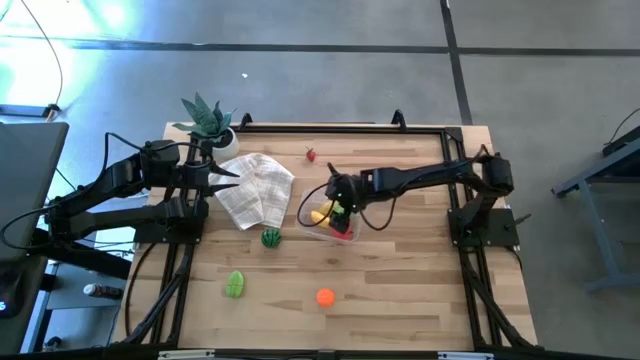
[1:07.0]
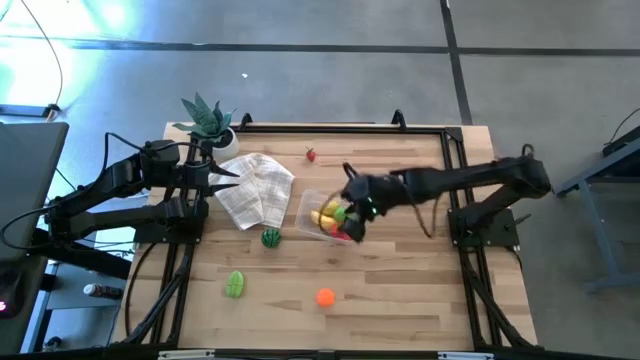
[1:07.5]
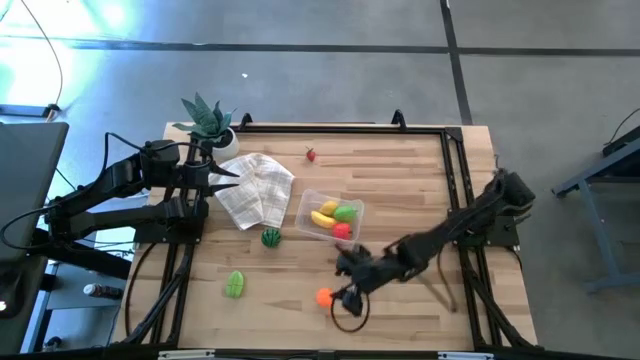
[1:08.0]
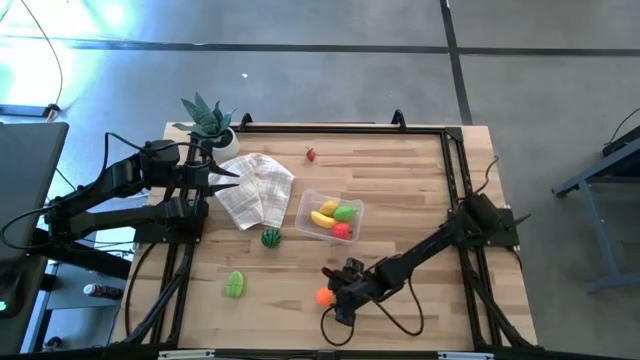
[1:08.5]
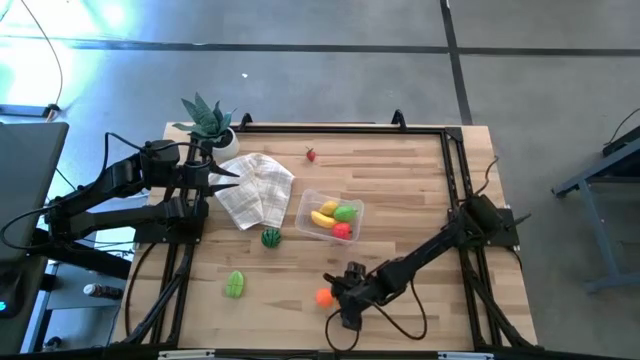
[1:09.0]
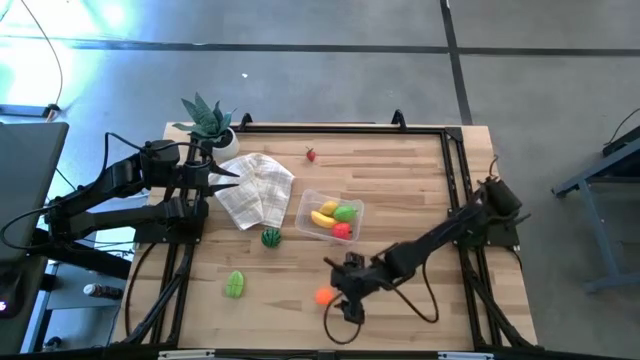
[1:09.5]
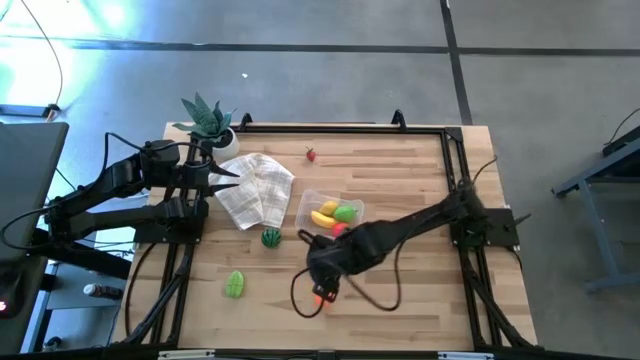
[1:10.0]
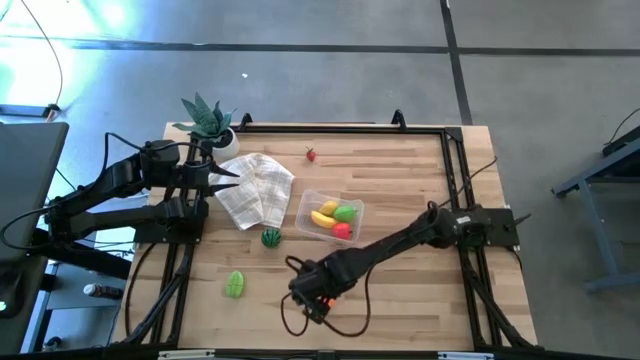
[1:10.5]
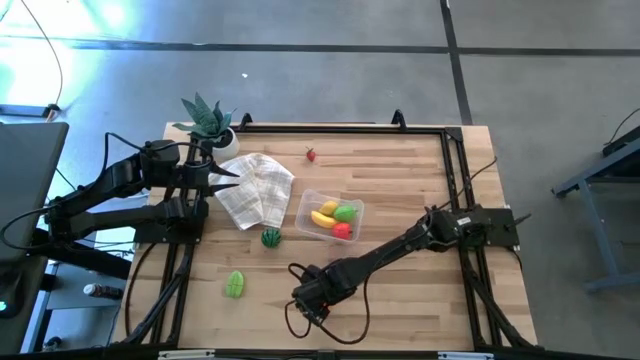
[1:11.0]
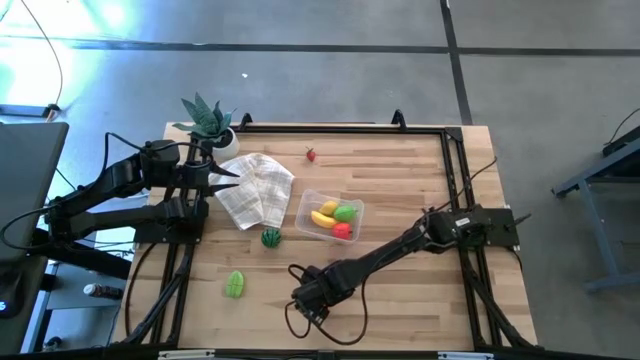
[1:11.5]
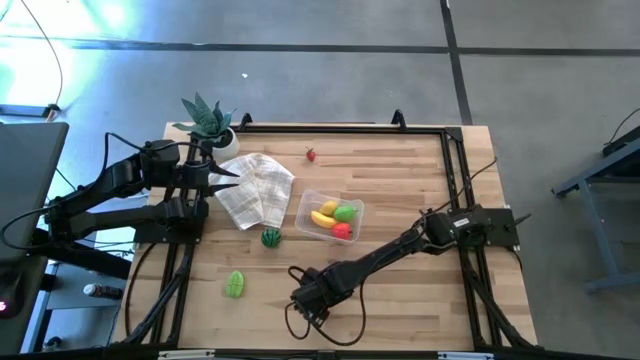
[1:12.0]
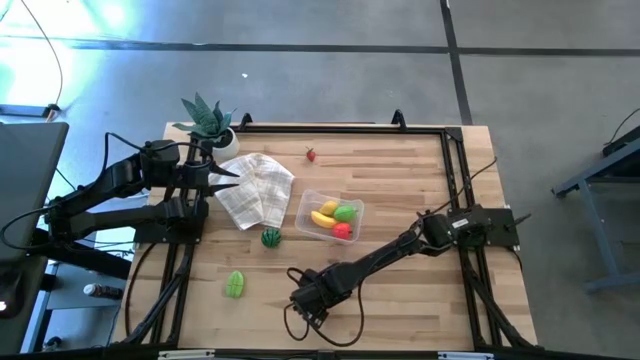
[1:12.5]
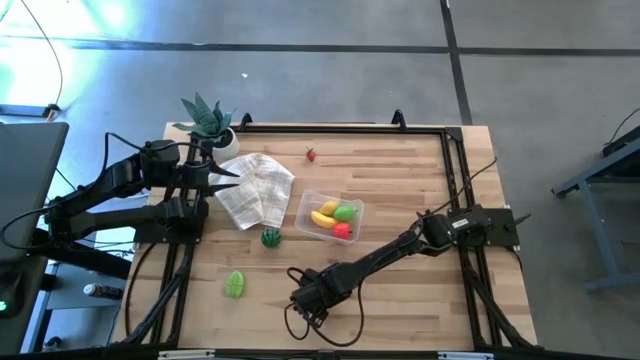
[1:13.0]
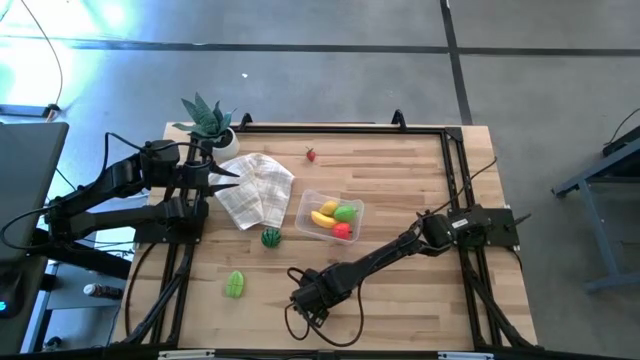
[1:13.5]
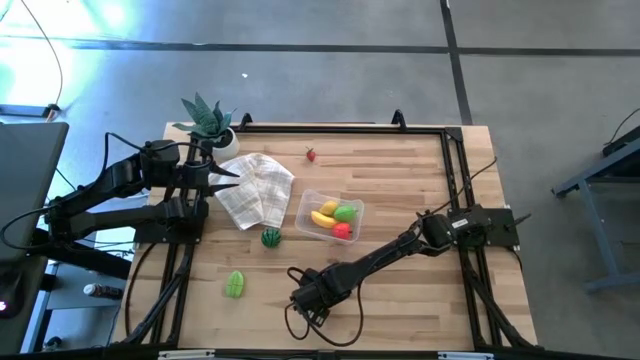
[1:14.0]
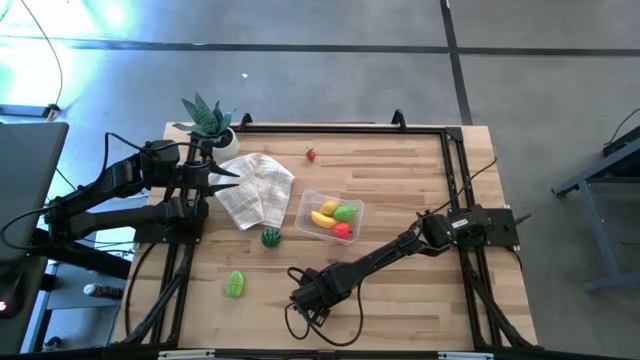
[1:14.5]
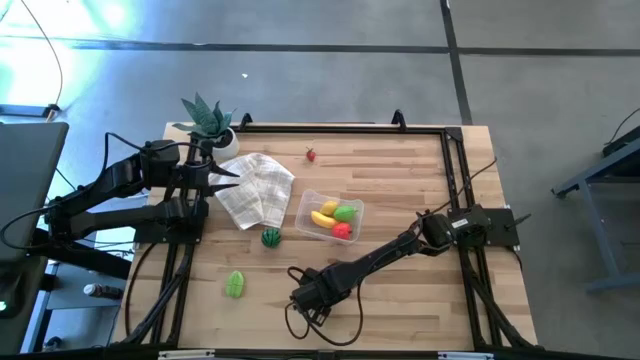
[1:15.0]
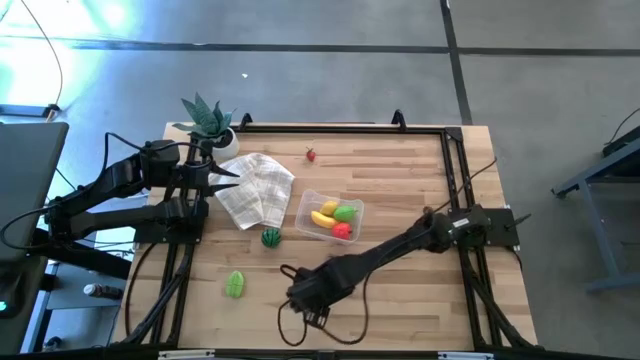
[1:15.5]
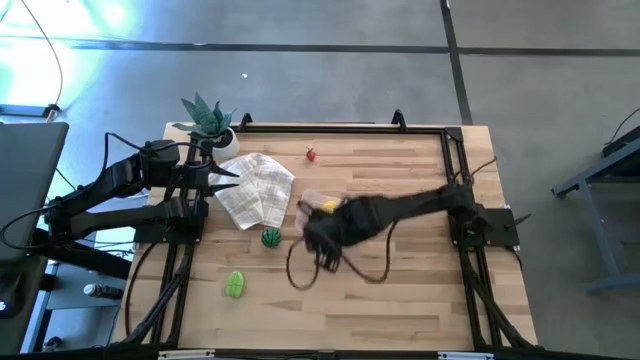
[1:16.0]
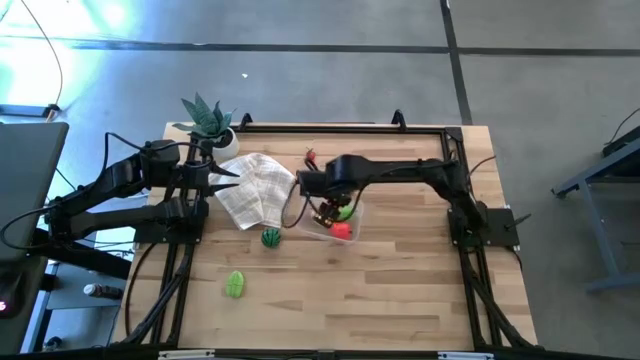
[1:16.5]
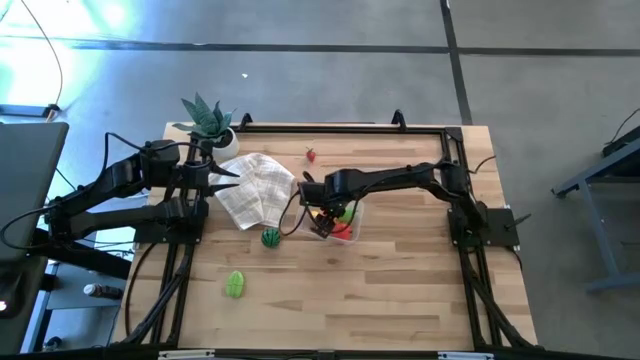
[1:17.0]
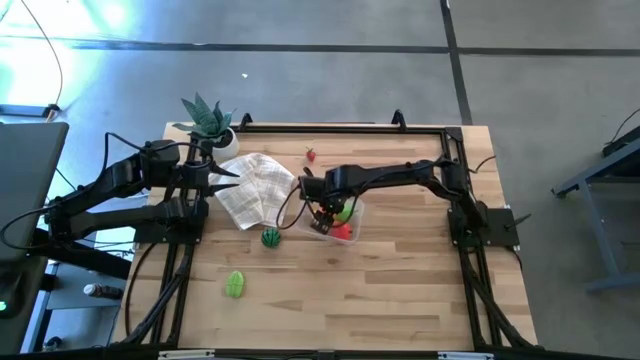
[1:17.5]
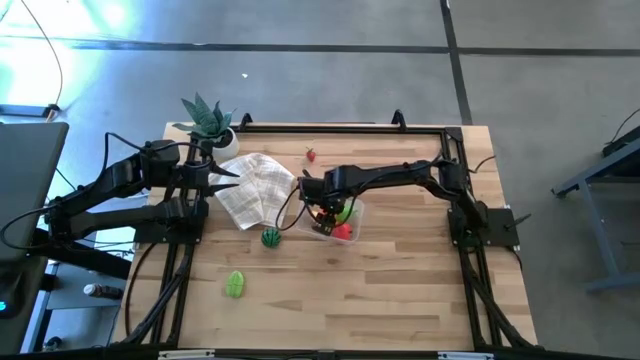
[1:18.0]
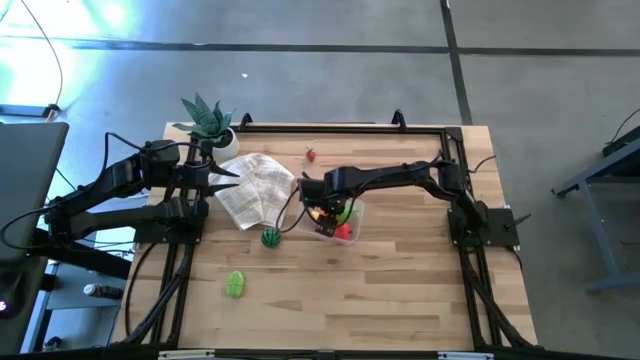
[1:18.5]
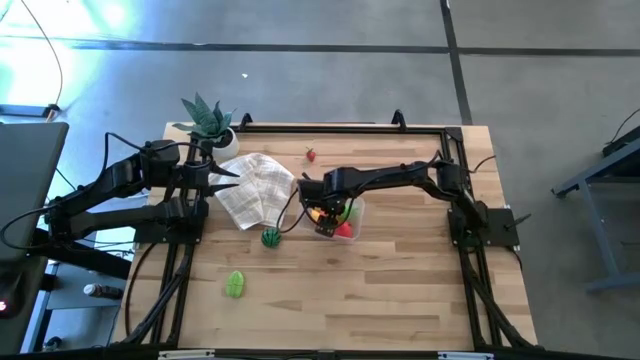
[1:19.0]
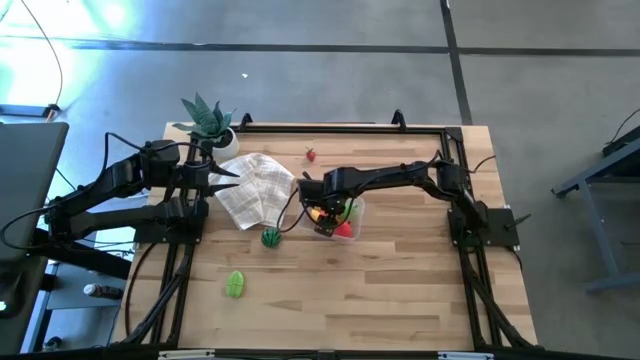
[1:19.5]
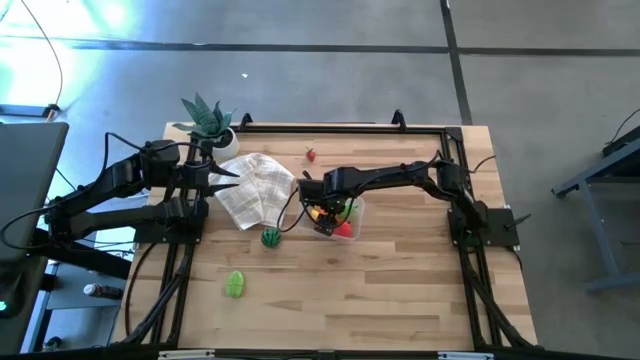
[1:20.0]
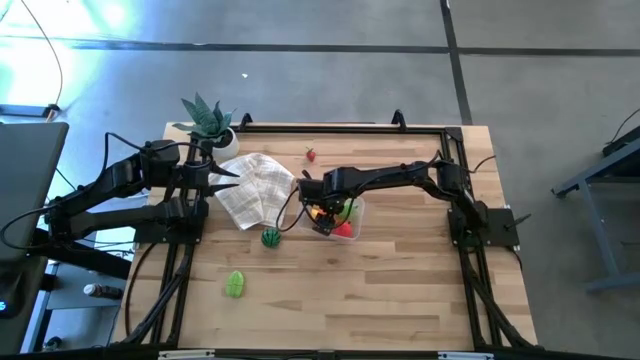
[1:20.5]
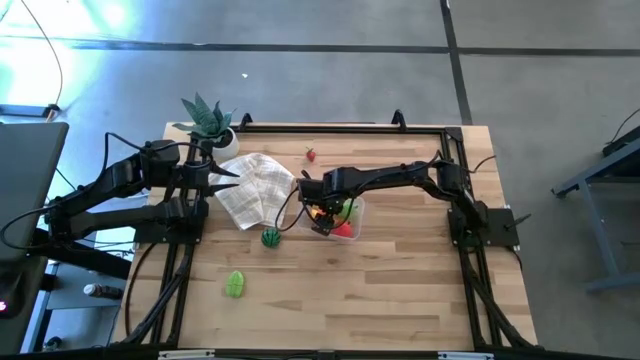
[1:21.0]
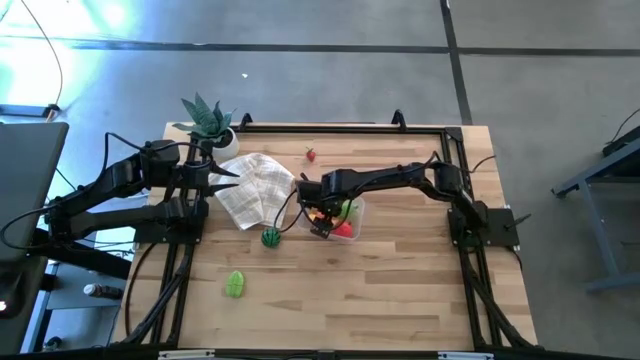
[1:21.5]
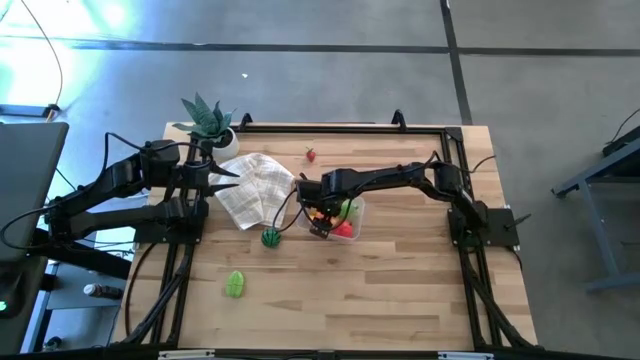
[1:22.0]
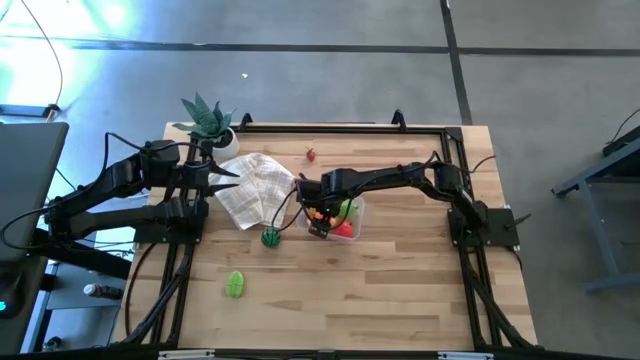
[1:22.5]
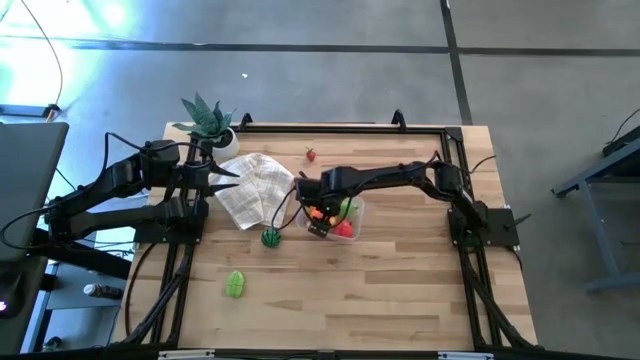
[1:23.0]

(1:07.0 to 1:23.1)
Task: Pick and placing Produce into tupperware
Put the orange pumpkin into the transparent container

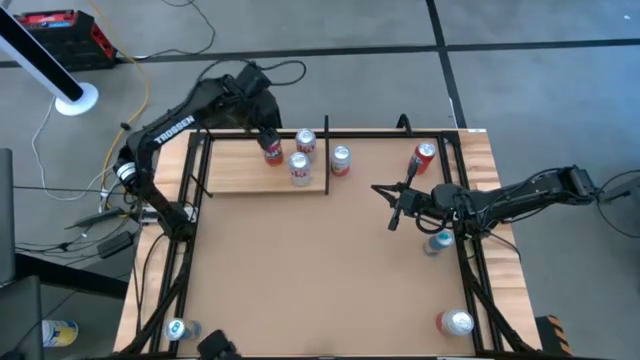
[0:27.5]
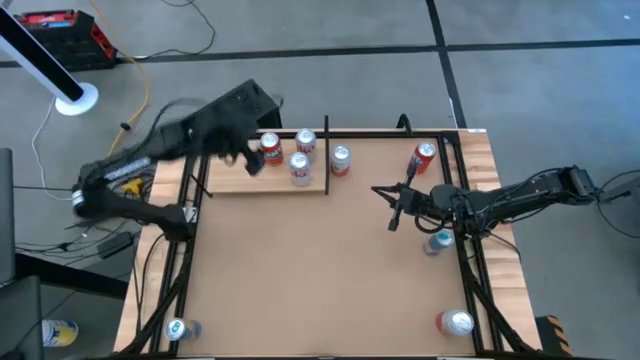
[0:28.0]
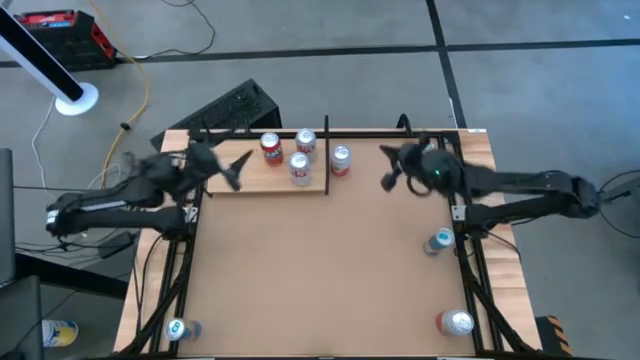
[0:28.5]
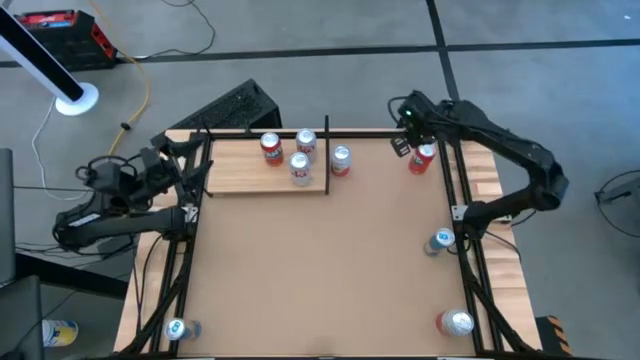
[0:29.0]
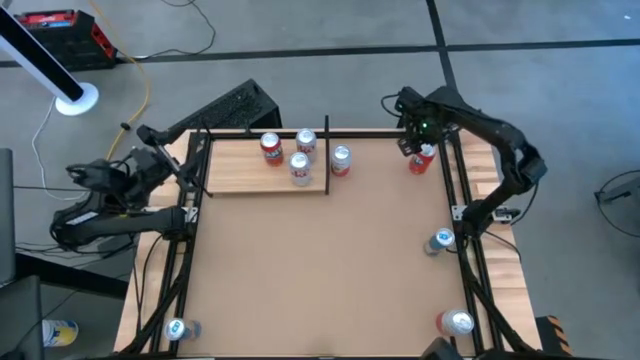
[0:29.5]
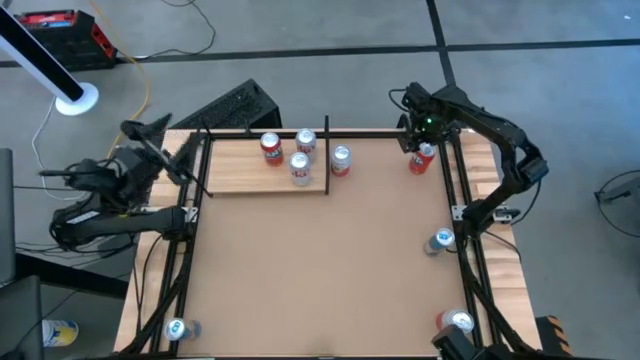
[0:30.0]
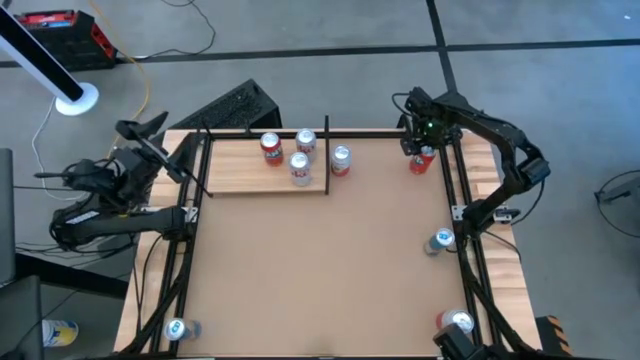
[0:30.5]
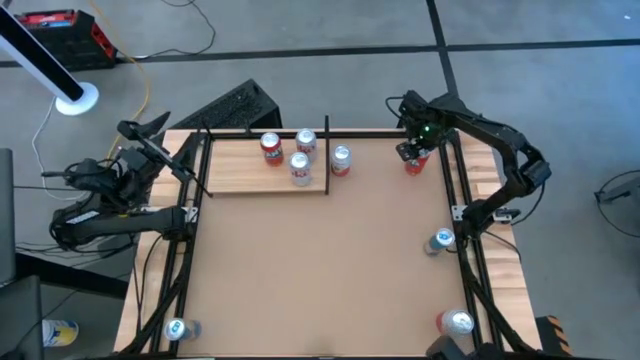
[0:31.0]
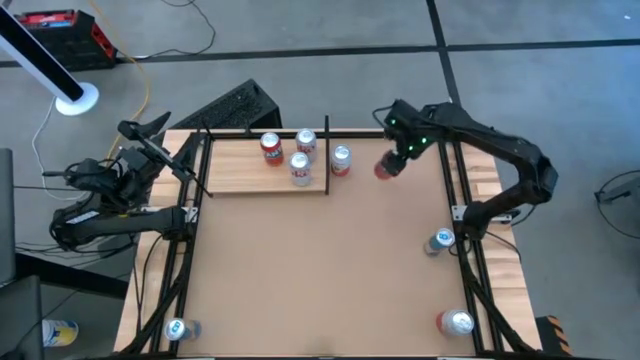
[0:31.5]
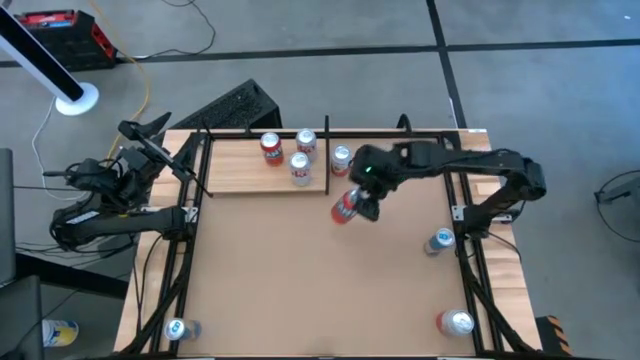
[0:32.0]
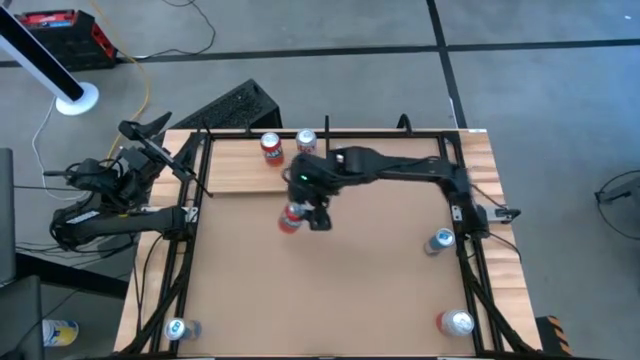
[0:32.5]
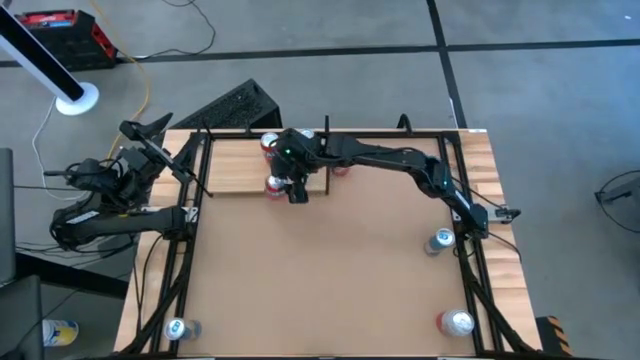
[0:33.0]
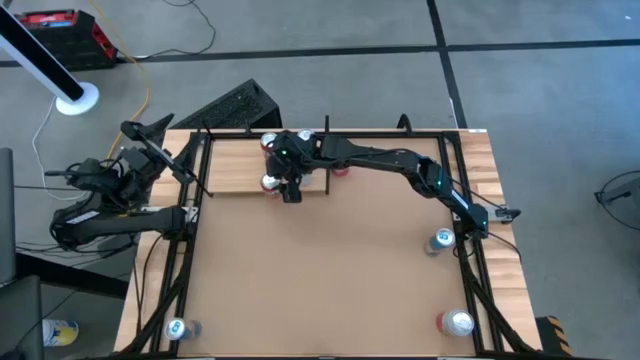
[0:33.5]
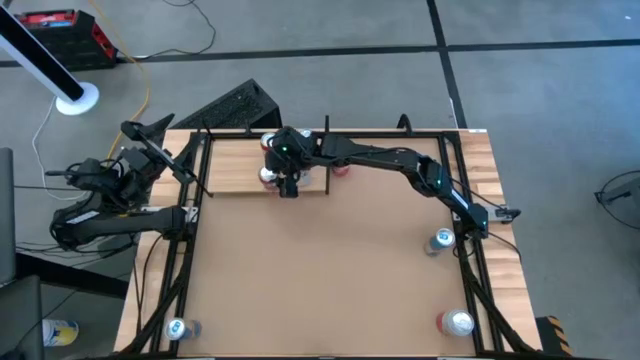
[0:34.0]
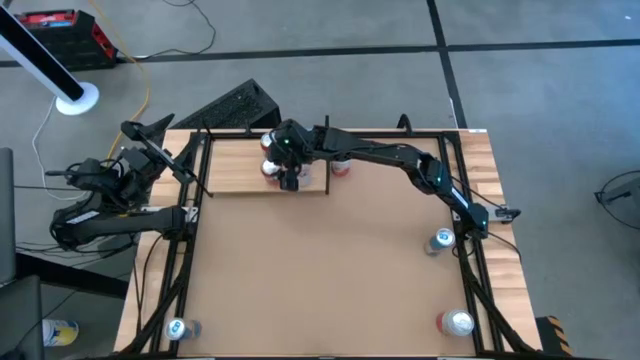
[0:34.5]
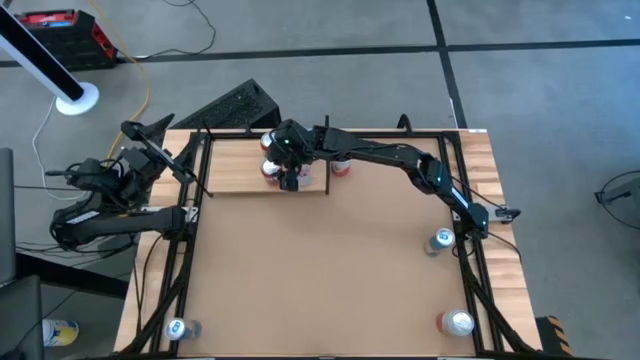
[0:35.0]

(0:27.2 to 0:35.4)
Task: Place canned beverage on shelf
Put the red soda can on the shelf aligned with the other red soda can
